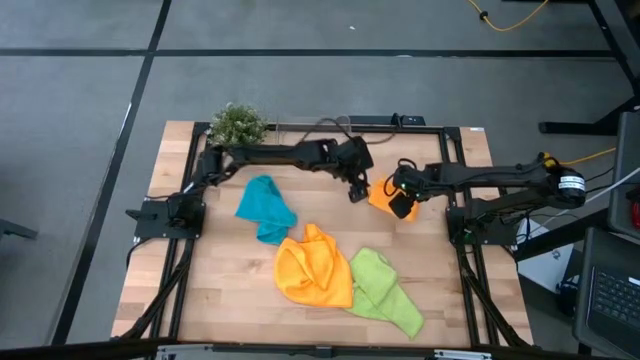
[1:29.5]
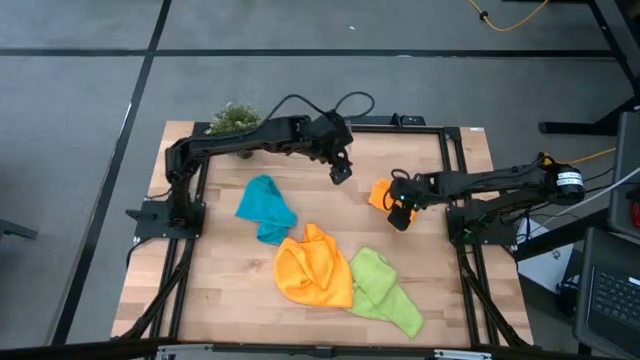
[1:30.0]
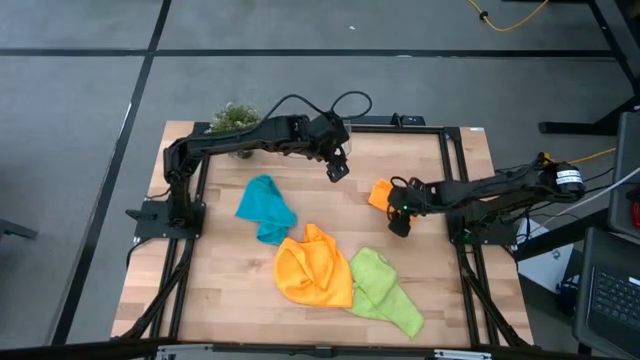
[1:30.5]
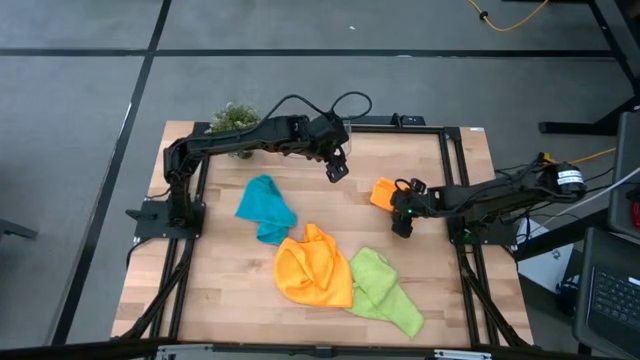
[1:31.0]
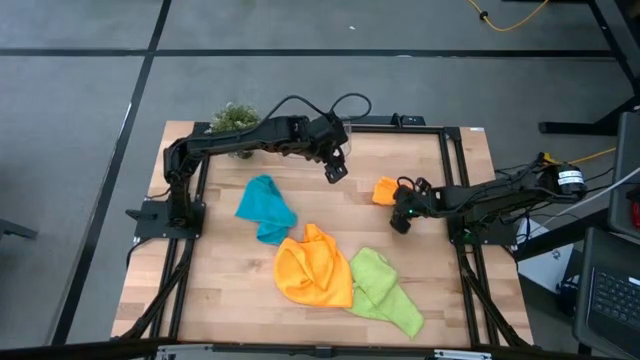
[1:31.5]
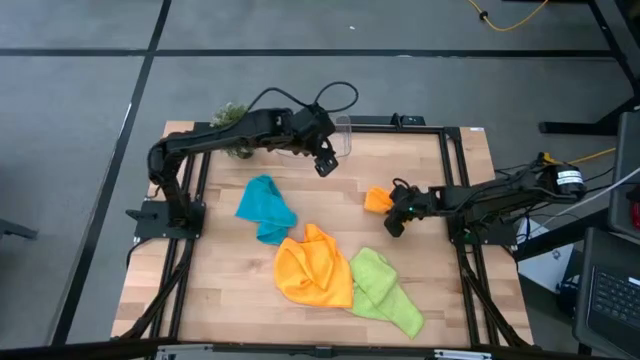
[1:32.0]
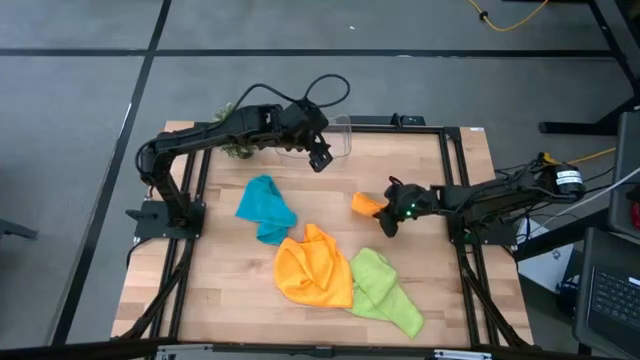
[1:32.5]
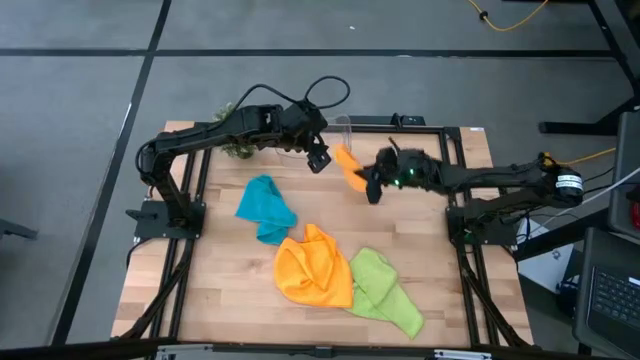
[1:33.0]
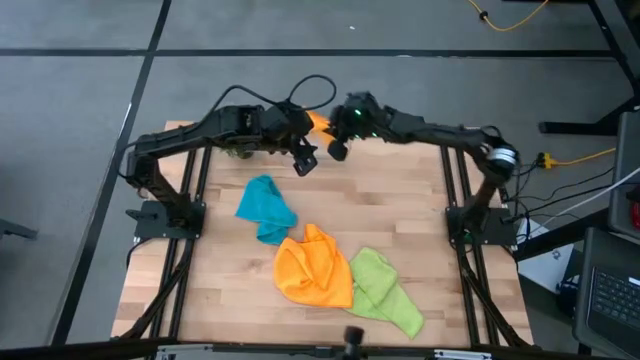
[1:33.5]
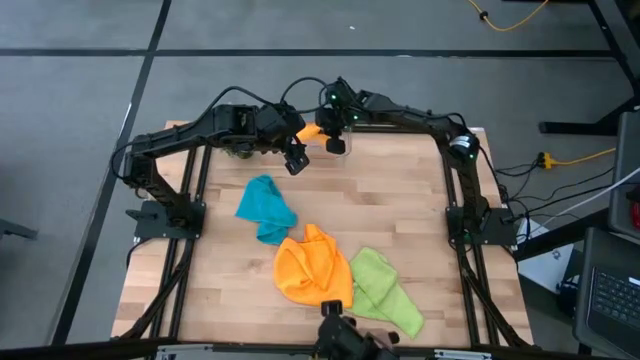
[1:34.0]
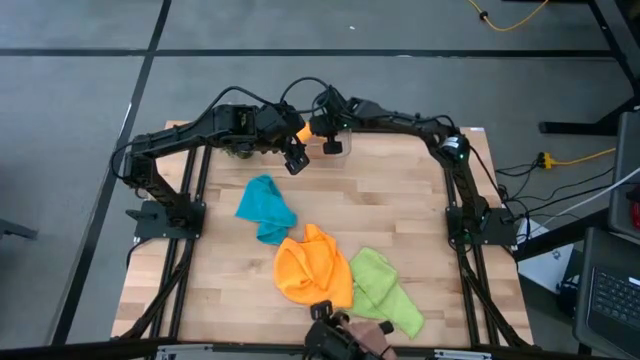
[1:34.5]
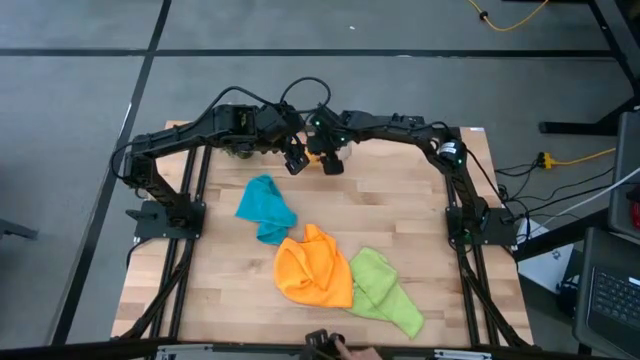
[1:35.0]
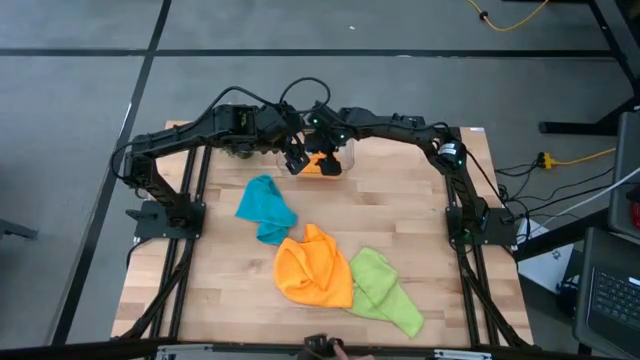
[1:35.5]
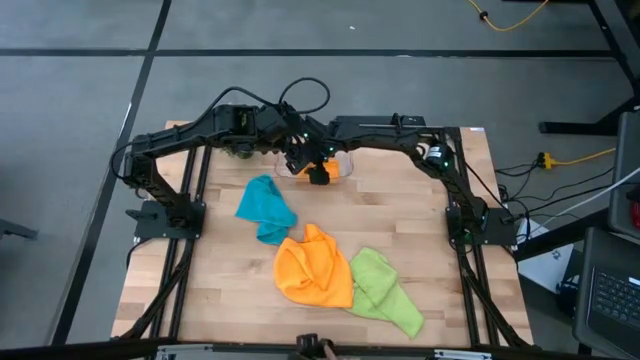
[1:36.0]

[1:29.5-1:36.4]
Task: Fold microfiber towels
Put the top orange microfiber cloth into the bin

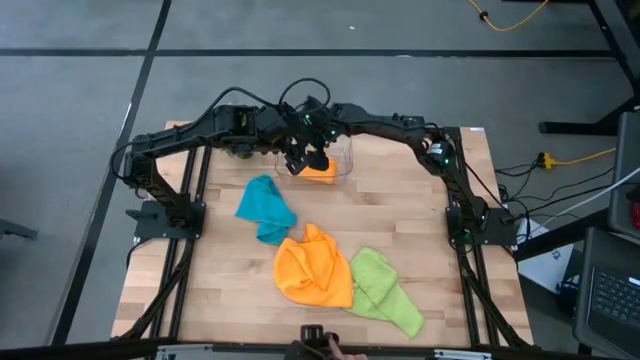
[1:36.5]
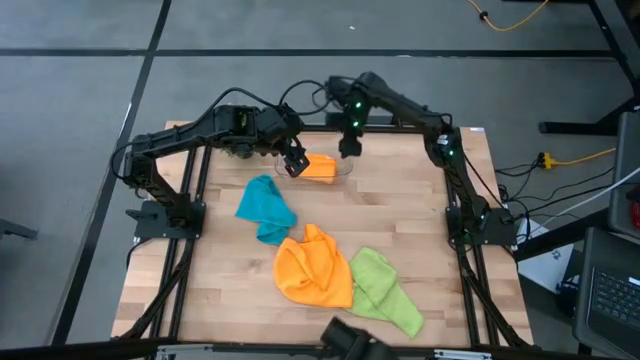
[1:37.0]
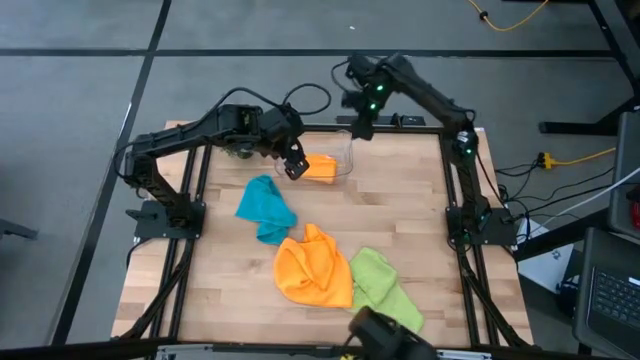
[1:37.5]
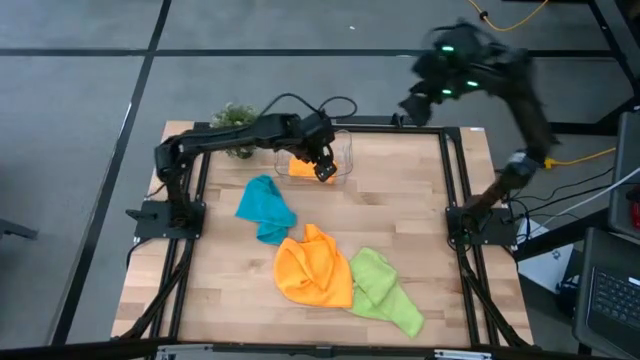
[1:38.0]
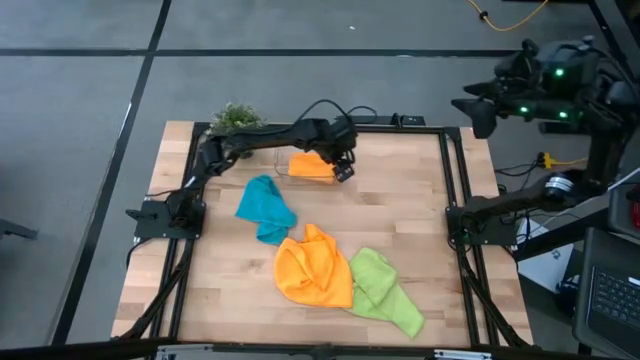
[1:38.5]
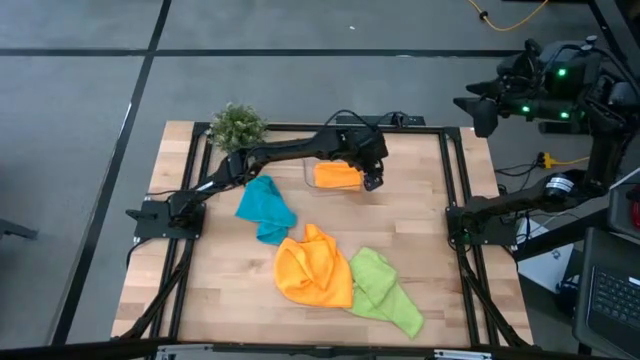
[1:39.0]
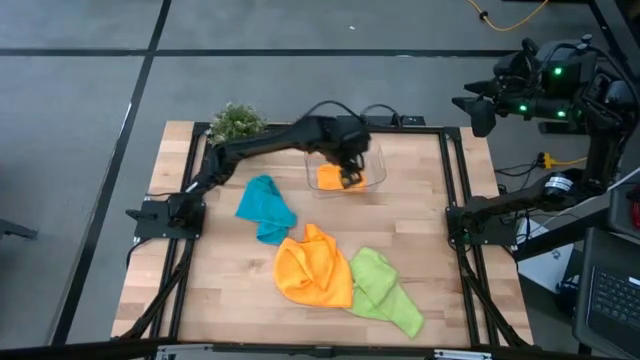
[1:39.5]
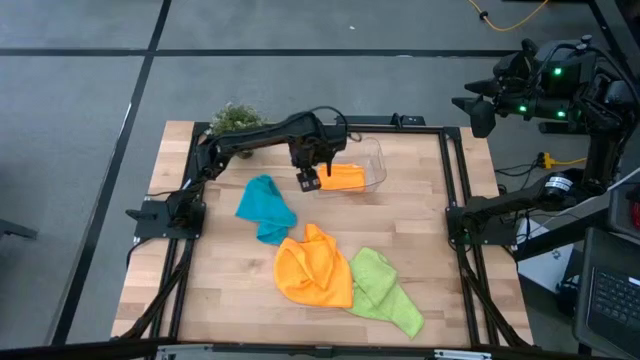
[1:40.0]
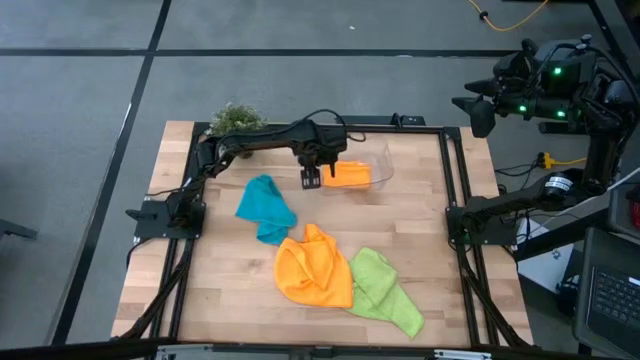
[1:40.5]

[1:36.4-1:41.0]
Move the bin to the top center of the table

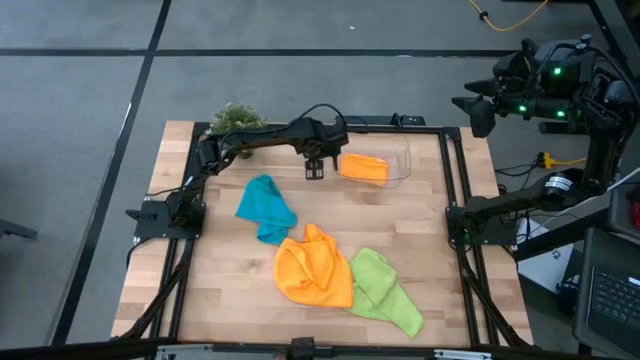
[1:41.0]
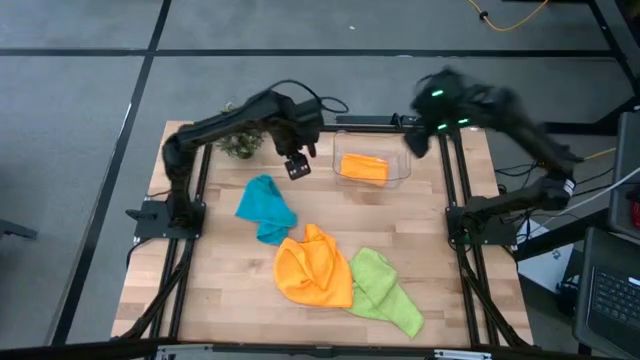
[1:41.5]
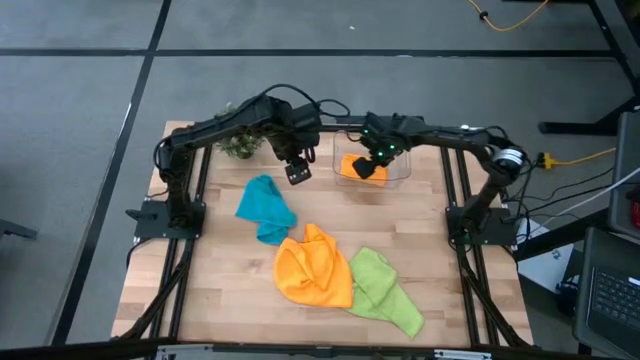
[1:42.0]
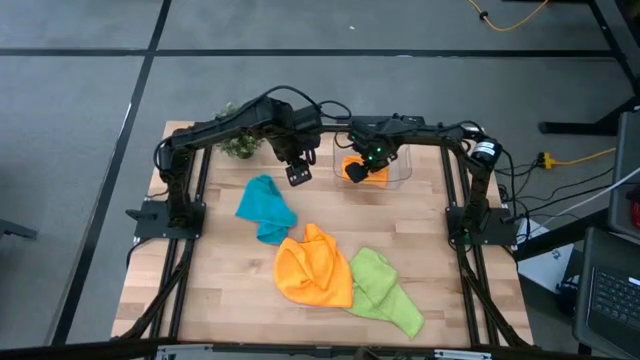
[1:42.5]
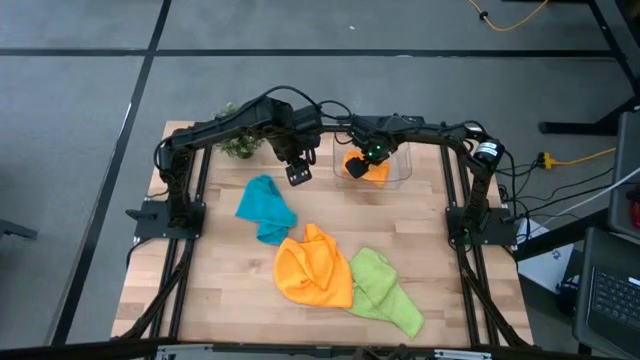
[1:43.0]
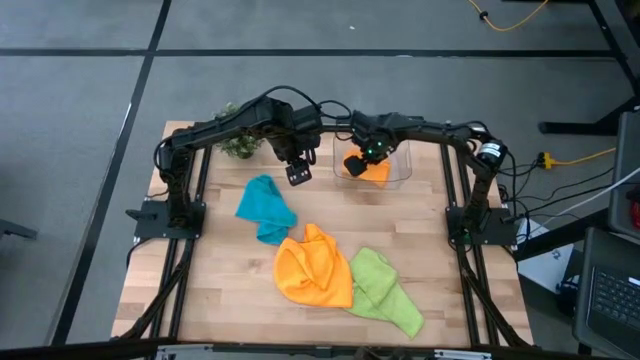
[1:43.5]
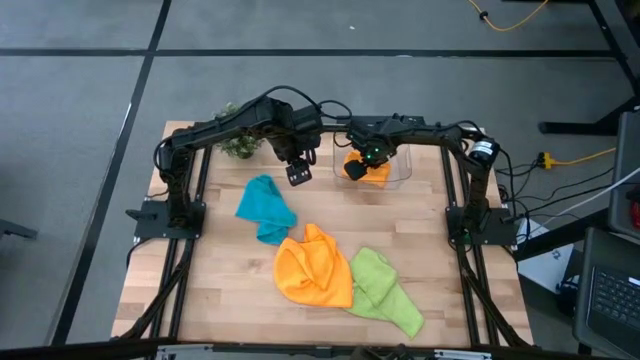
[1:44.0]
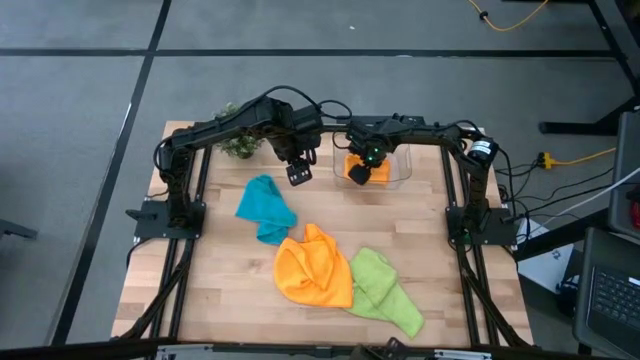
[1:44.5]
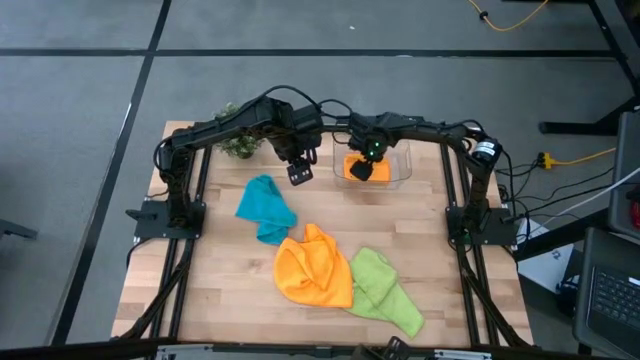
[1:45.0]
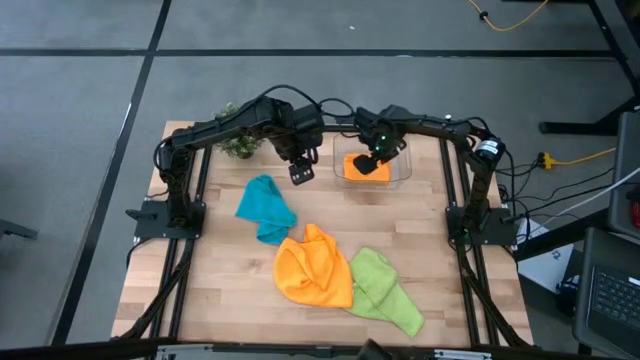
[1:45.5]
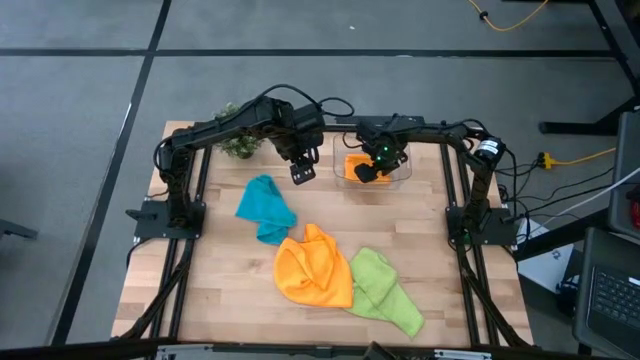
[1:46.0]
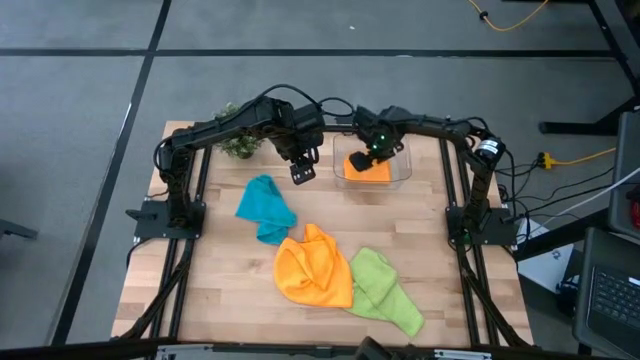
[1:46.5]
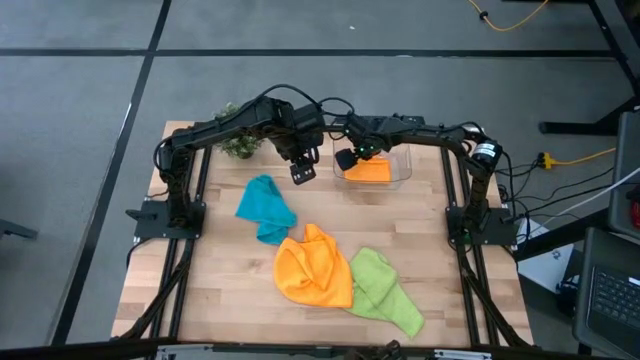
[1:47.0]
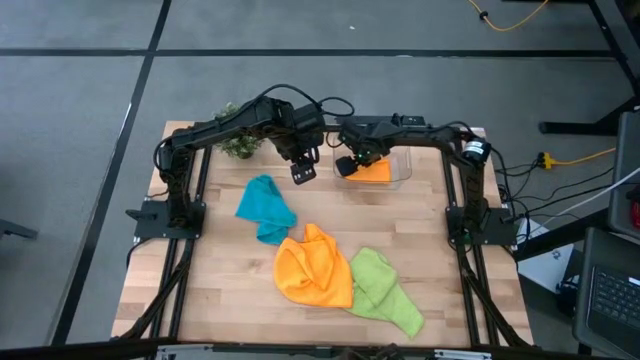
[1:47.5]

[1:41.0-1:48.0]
Adjust the orange microfiber cloth in the bin

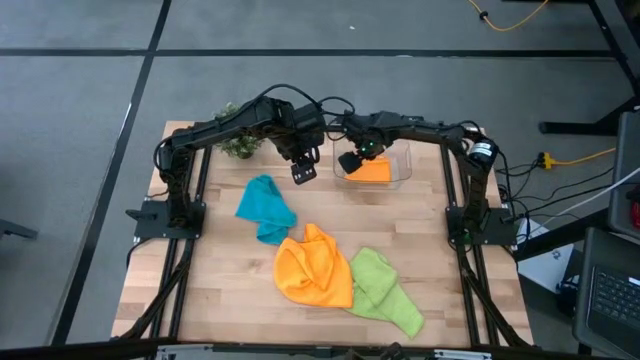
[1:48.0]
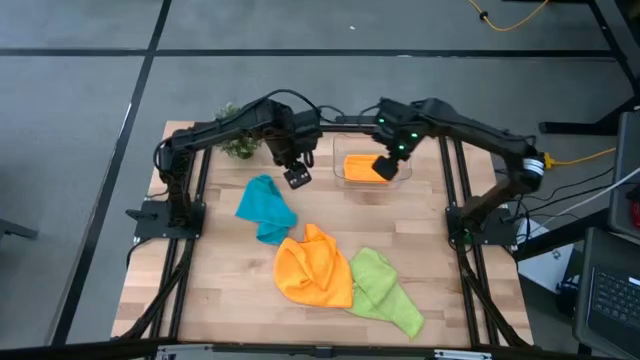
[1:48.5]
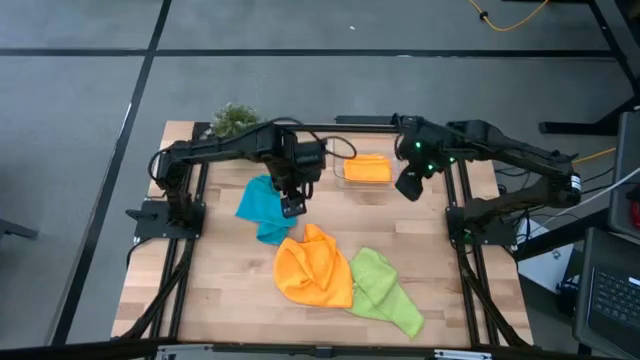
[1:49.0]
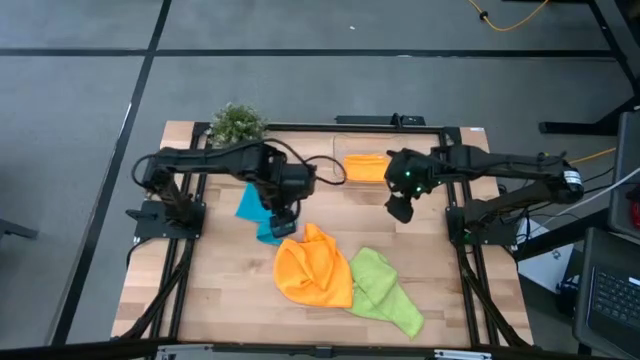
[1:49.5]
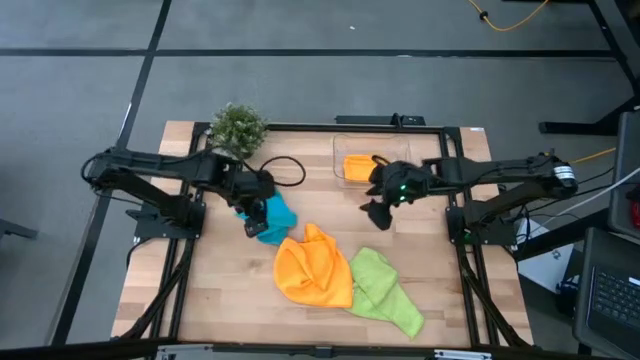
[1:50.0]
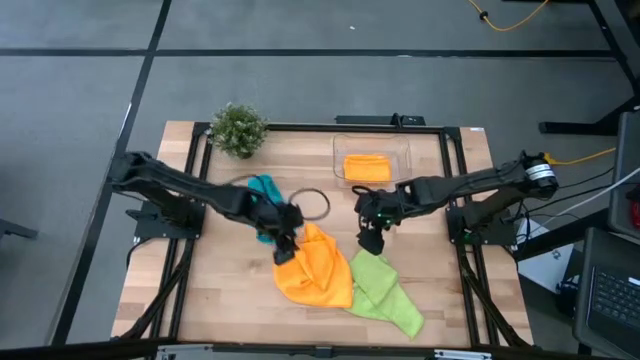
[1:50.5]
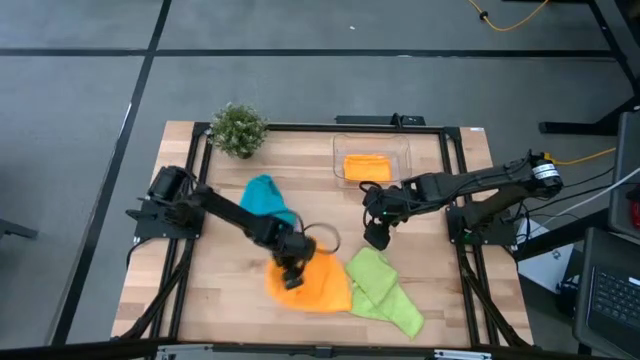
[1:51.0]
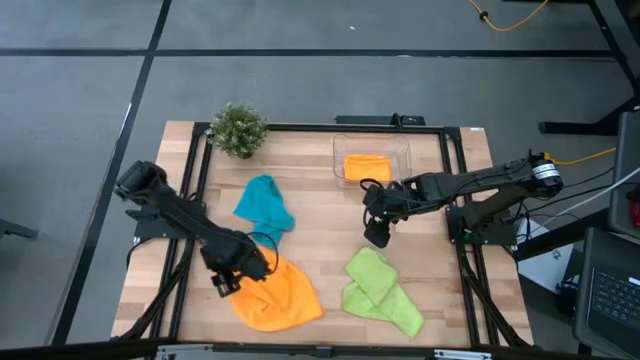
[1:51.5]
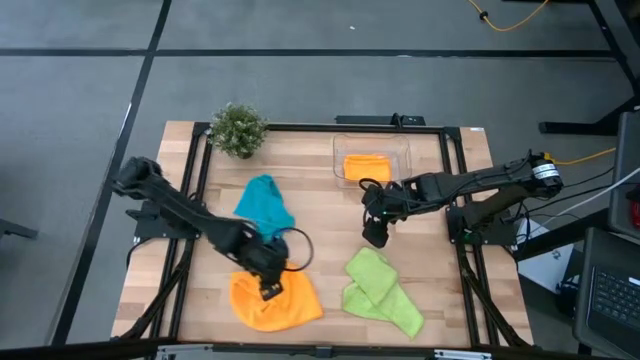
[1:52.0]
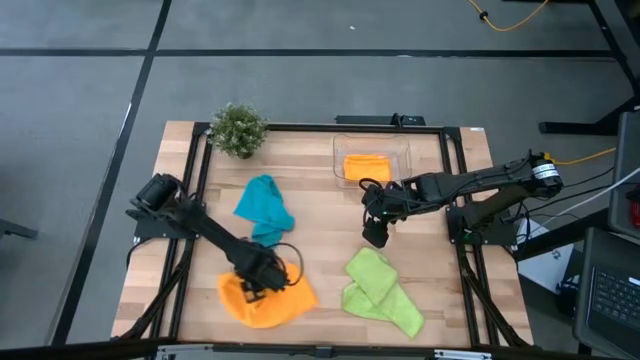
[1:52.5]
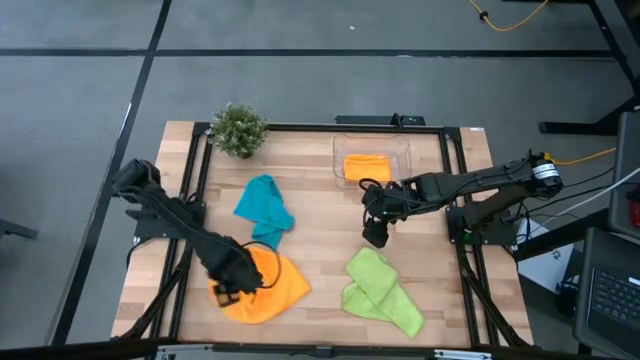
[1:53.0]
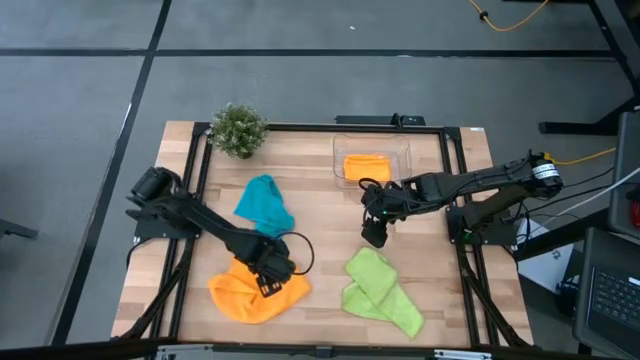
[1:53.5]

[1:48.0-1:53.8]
Move the orange microfiber cloth to the bottom left of the table
